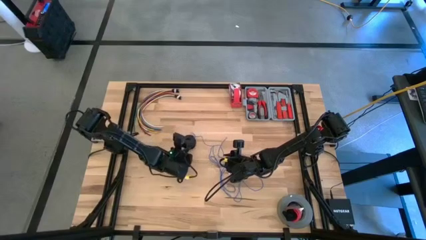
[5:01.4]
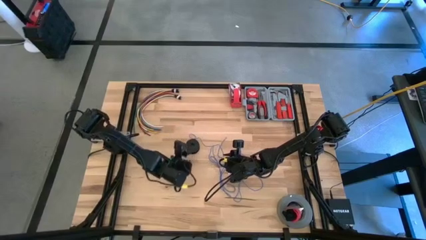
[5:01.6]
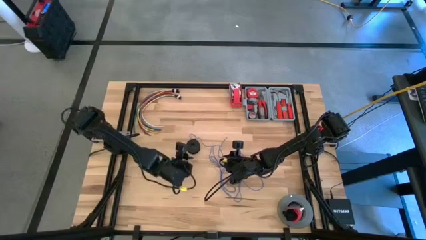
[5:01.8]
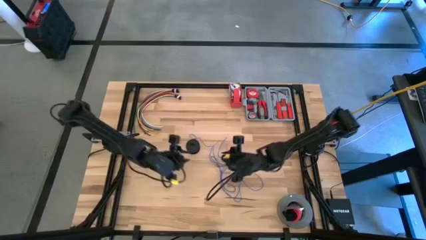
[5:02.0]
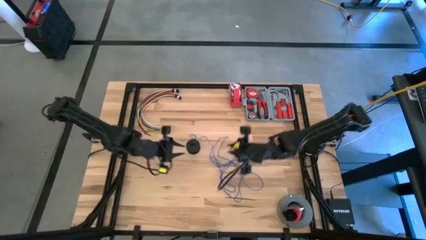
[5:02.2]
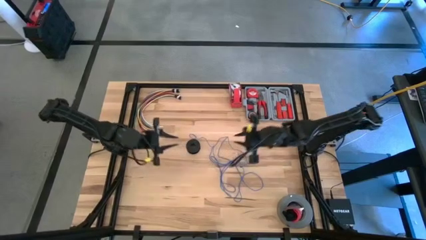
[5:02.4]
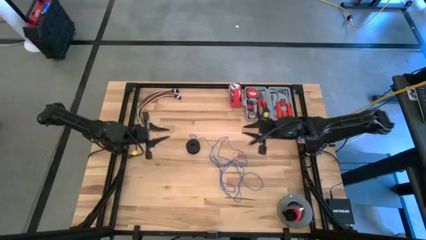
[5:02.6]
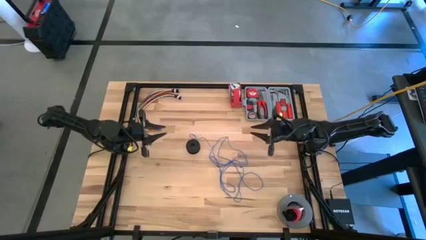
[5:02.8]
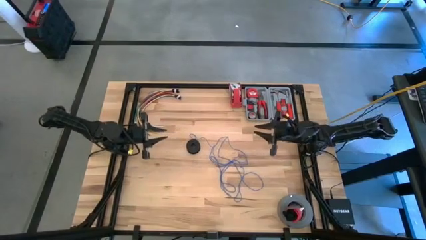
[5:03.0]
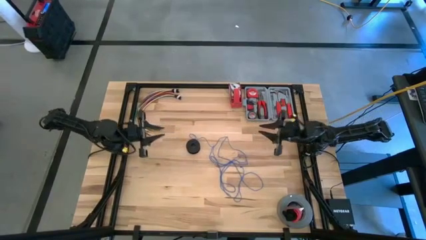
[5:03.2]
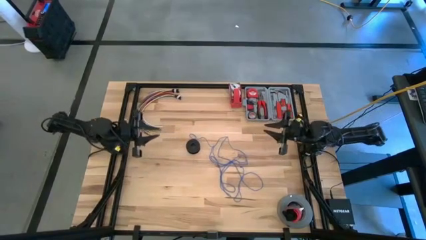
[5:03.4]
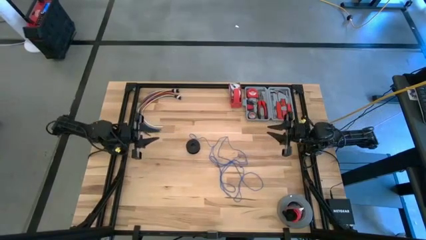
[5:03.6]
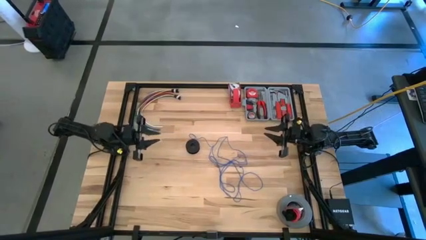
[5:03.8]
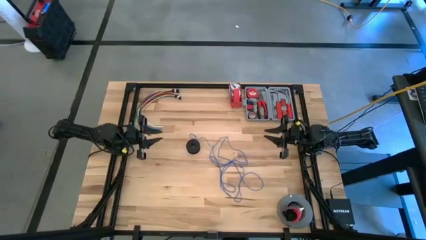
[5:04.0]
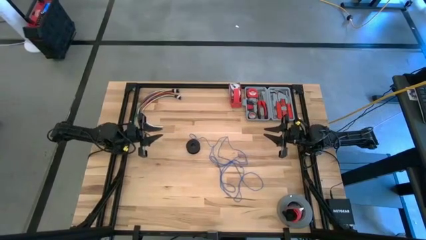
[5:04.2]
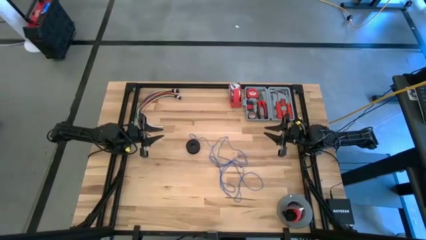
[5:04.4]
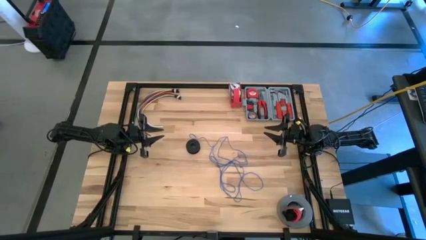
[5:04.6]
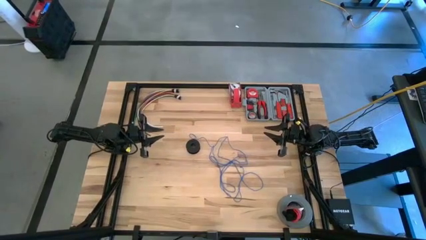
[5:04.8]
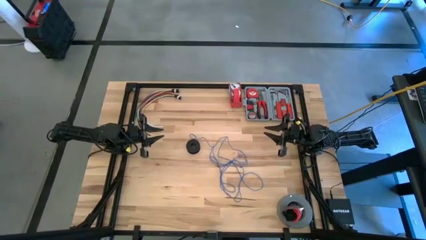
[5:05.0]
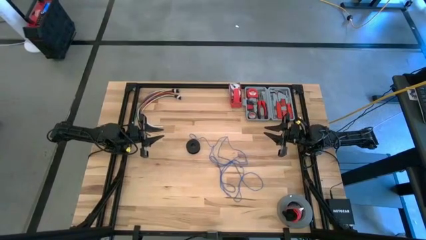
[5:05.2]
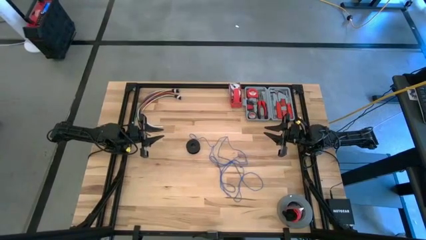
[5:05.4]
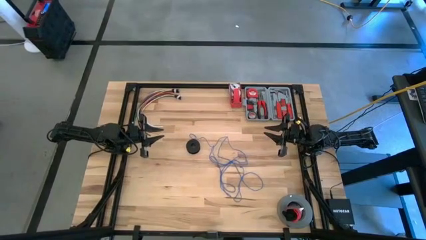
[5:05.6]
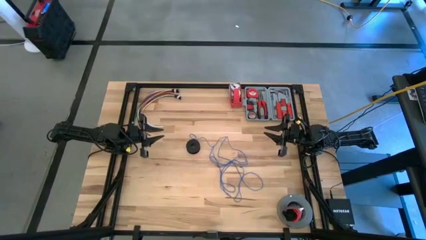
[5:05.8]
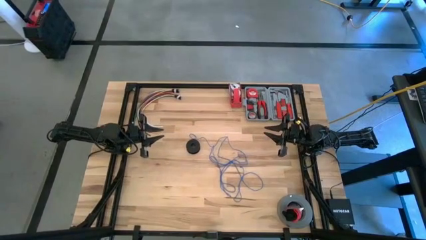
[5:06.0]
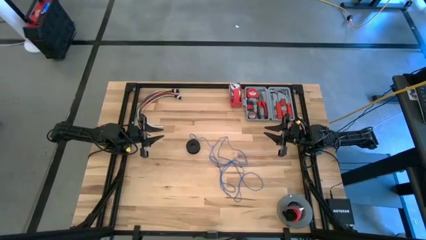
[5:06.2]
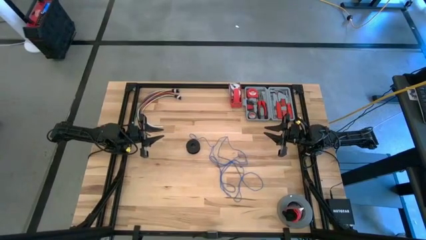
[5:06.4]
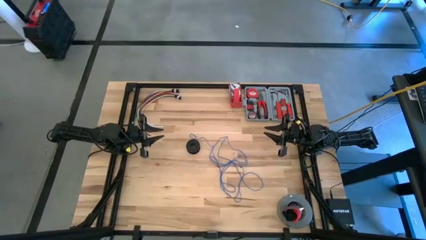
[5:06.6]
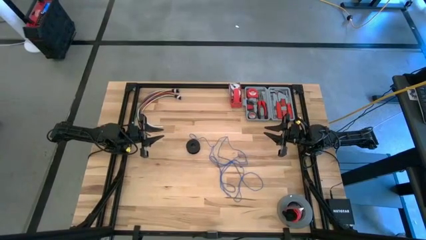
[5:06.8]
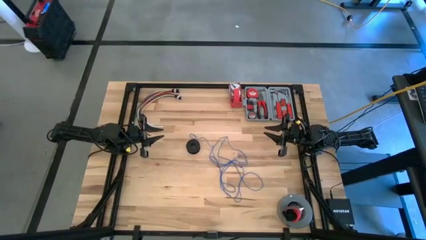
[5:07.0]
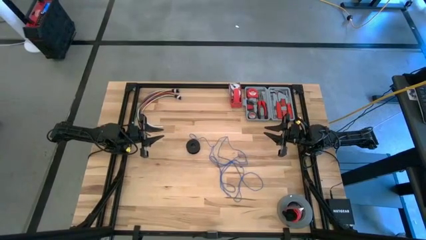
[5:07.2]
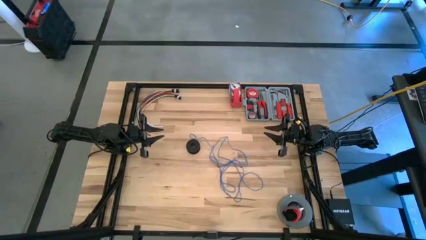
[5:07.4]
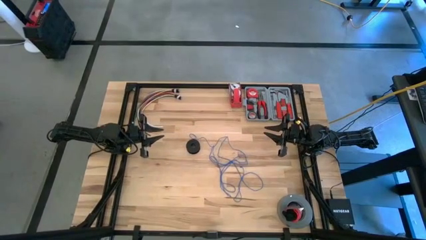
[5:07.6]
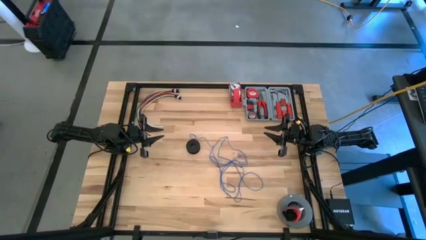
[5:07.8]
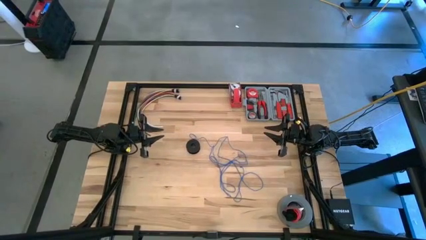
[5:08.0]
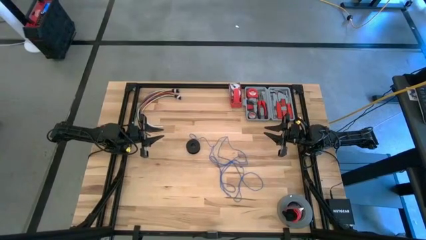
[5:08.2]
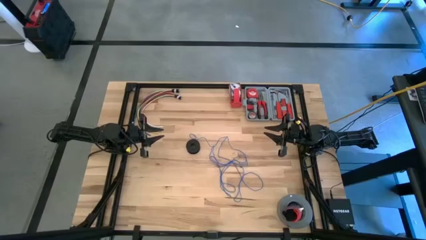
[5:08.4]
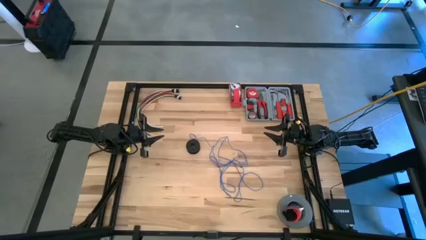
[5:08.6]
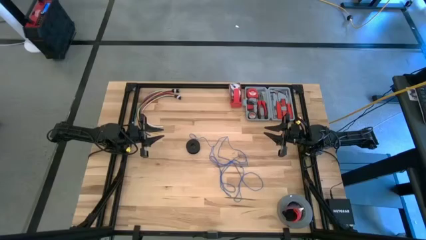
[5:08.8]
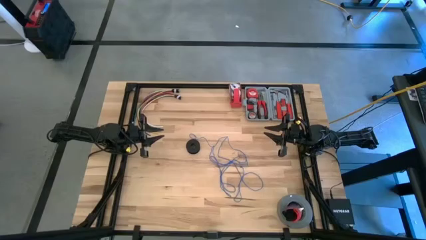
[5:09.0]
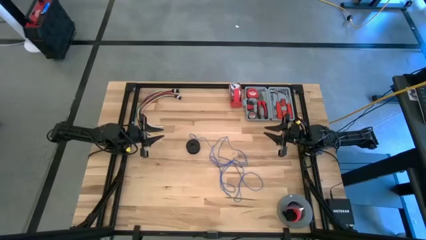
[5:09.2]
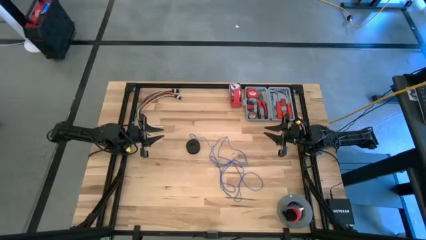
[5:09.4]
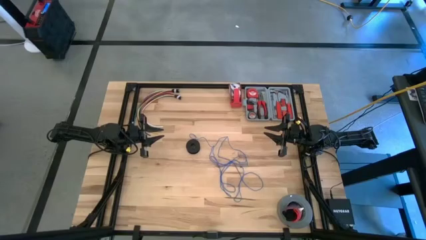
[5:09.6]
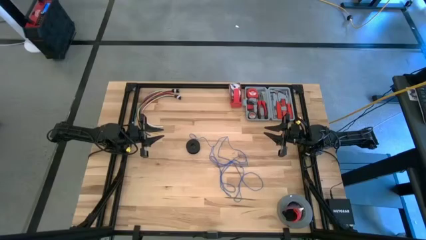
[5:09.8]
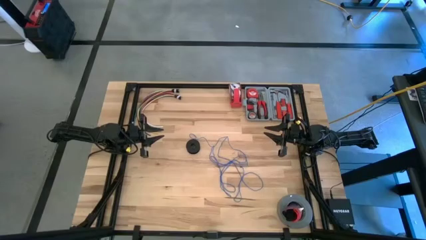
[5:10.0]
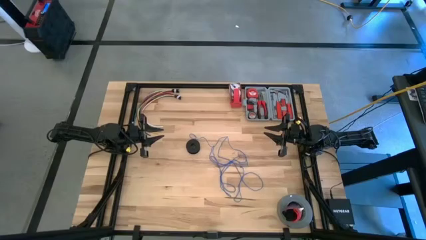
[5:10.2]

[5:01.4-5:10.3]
Task: Coil cords
Return to Home Position

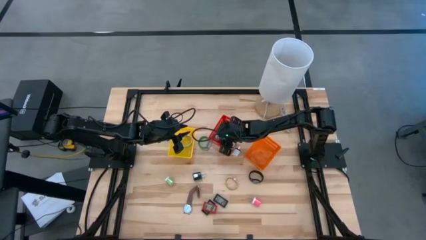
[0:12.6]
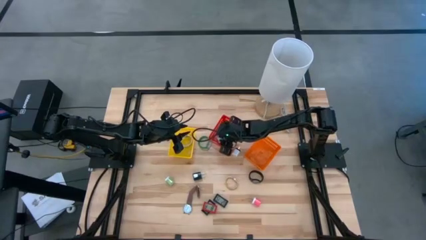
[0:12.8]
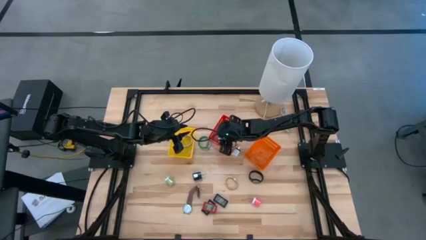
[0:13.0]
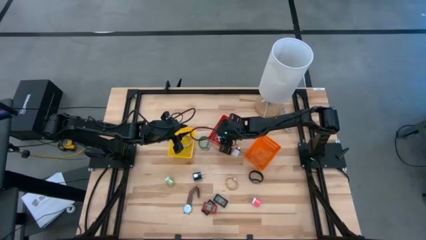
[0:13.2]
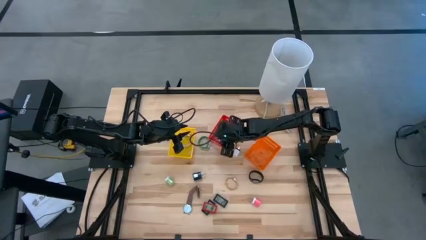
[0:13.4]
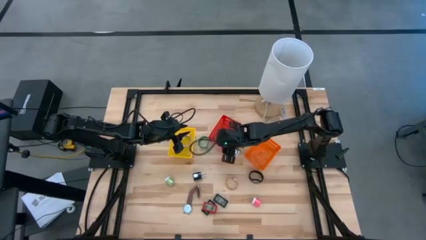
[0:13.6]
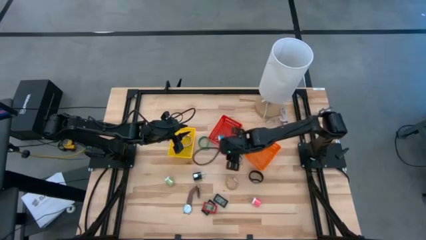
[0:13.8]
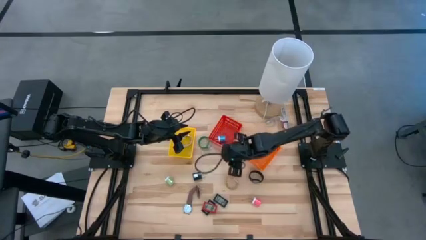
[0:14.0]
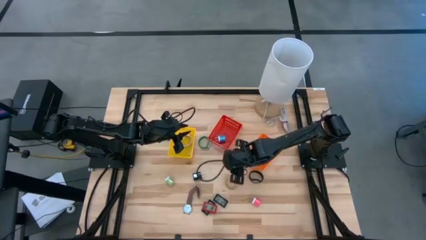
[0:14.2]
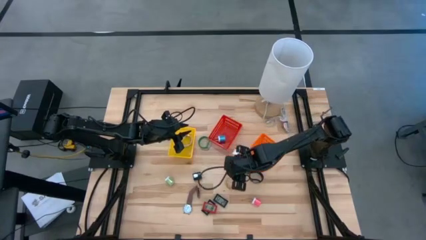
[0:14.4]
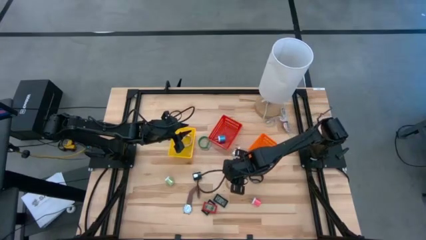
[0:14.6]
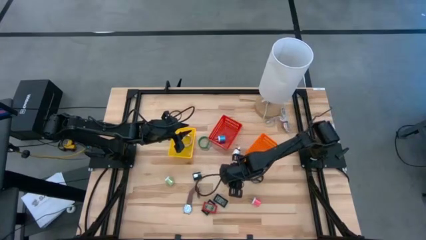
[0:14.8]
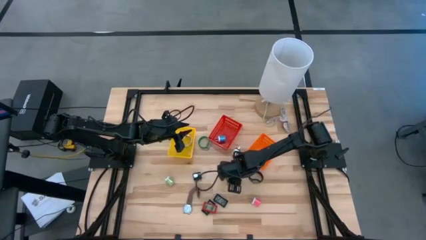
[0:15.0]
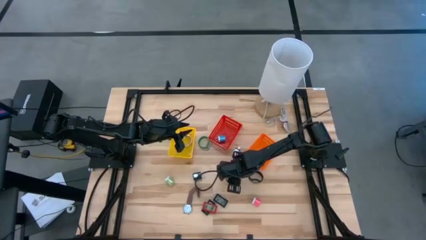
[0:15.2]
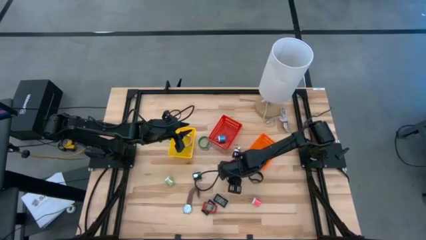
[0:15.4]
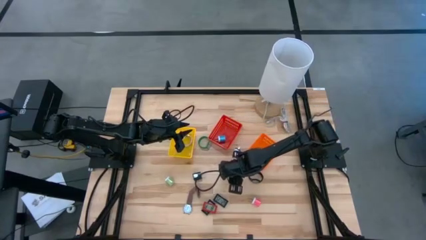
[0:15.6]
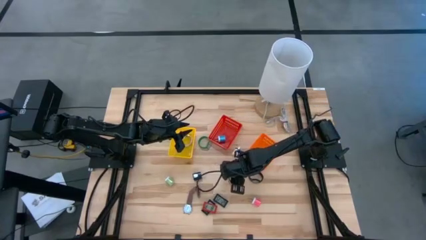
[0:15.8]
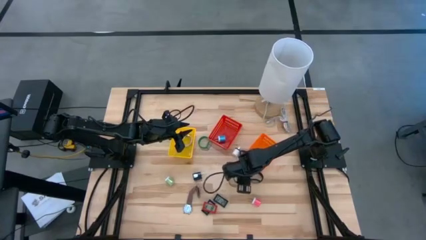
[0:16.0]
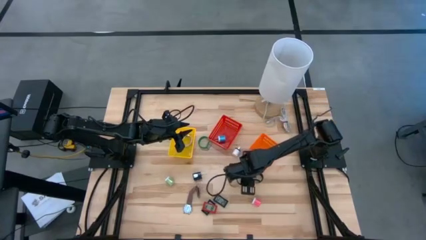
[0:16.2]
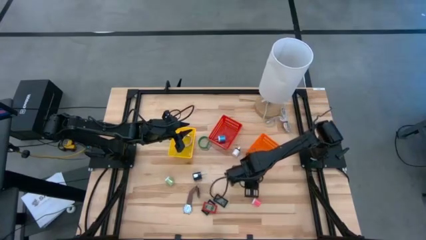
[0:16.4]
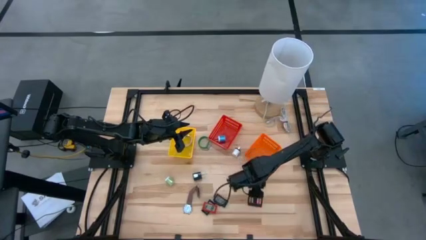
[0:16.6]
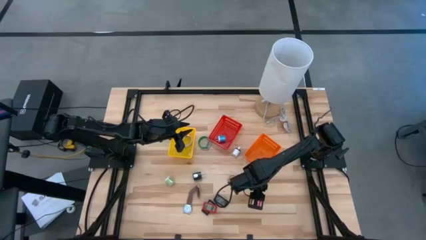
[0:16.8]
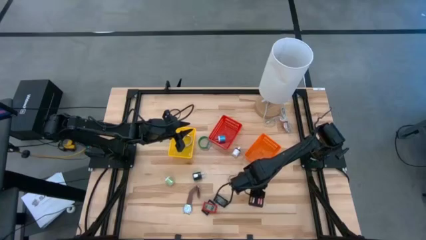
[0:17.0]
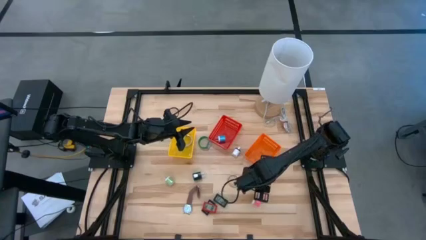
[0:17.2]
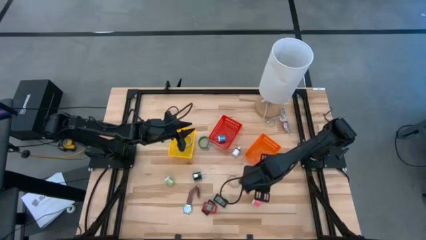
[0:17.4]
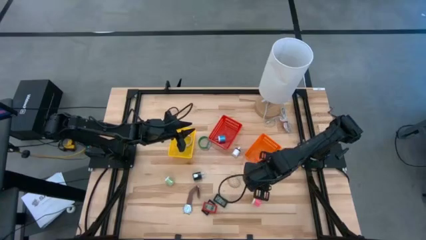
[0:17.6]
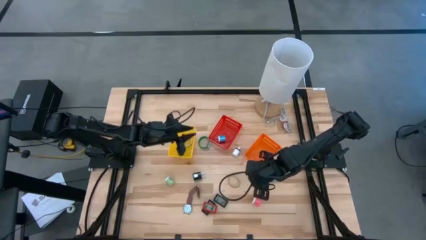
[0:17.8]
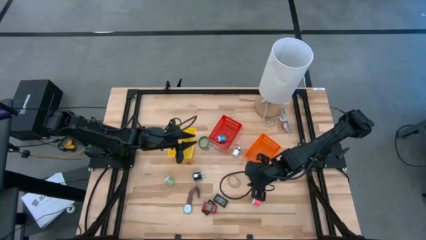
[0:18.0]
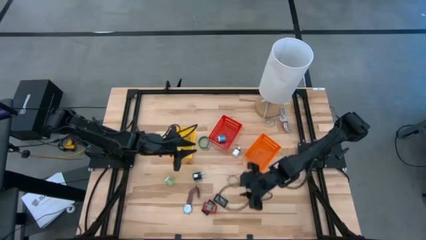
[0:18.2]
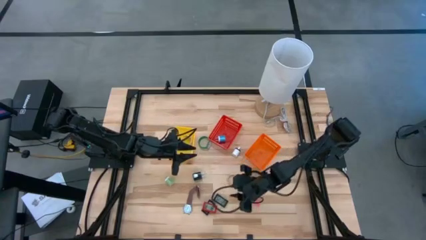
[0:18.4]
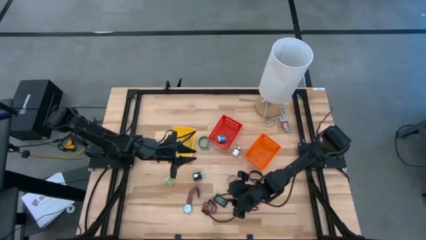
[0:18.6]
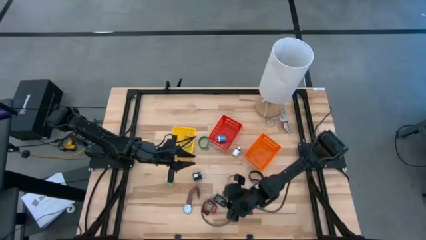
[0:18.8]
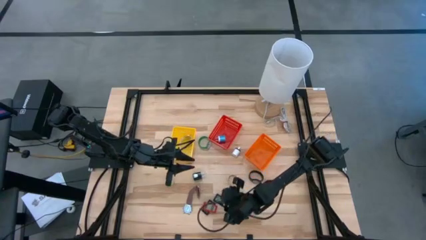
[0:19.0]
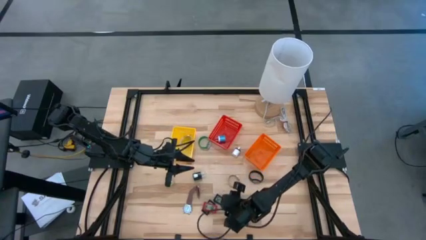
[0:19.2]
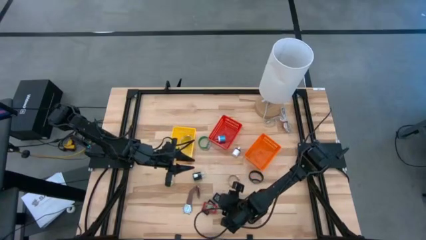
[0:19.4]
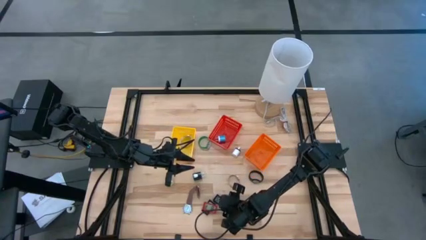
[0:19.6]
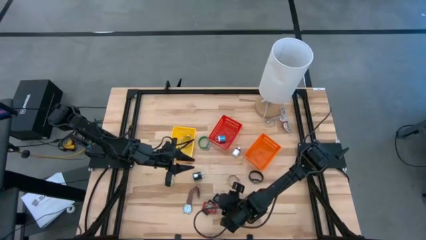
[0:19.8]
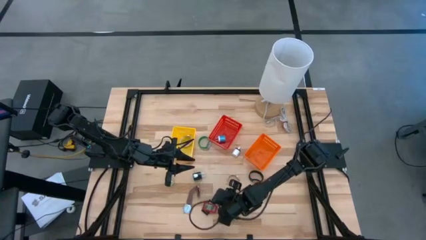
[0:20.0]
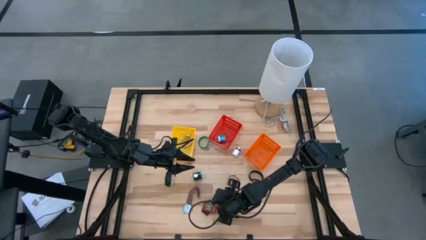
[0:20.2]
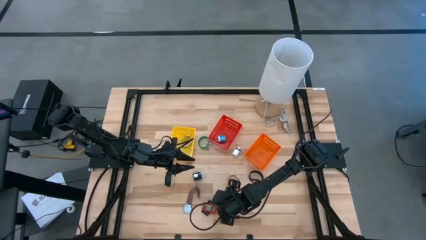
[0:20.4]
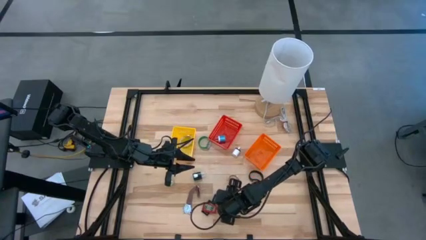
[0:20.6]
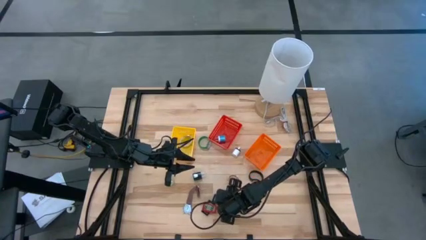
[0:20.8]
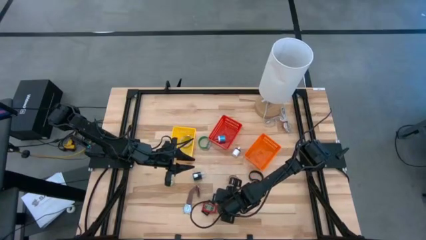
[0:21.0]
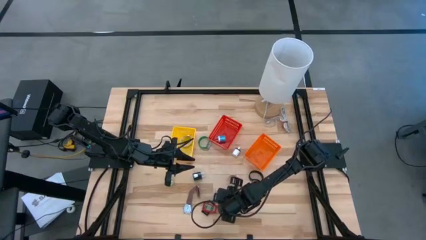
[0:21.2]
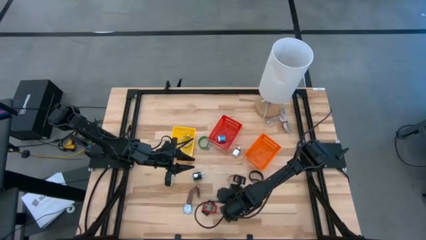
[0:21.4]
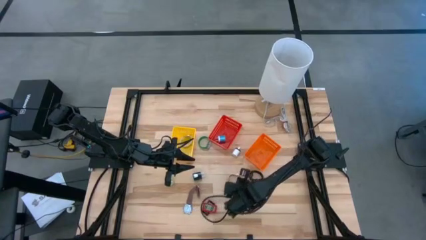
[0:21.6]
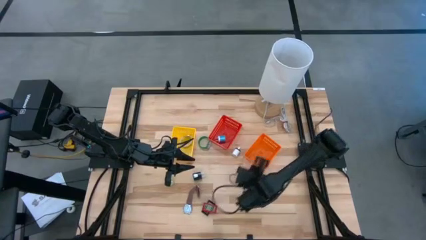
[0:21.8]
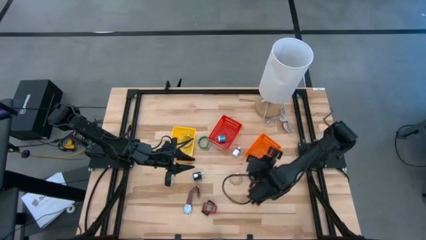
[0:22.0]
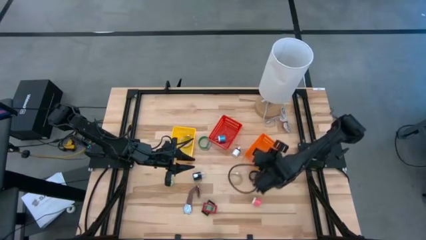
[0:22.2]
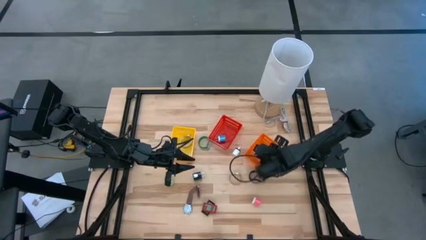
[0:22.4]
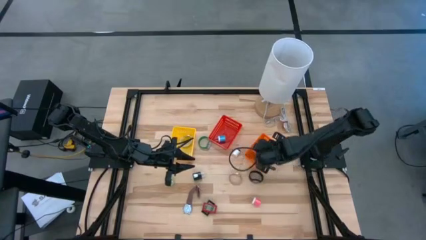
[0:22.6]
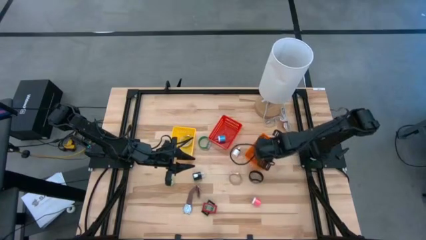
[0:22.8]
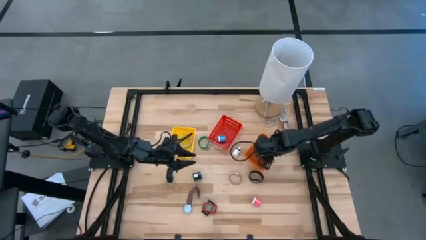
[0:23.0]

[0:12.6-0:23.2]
Task: Pick & Place Office items
Put the right black digital clock into the orange bin
